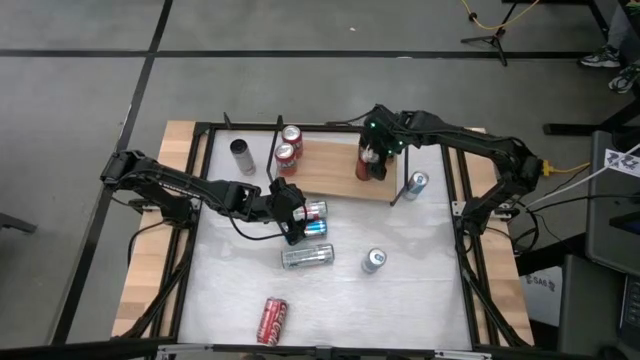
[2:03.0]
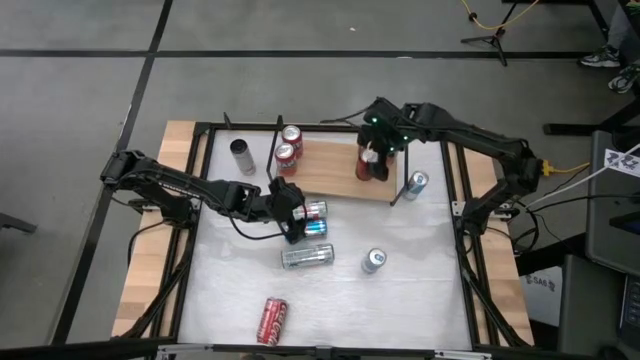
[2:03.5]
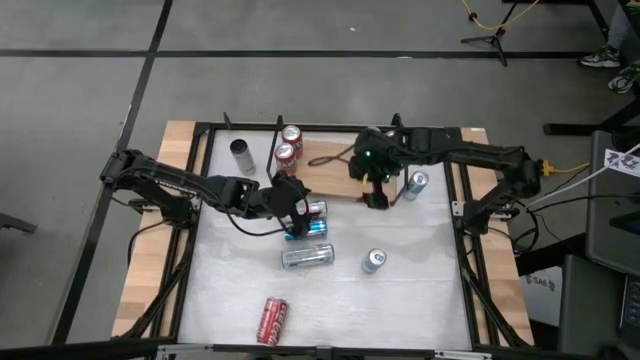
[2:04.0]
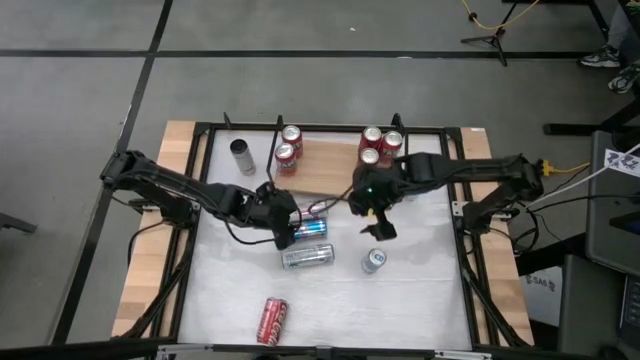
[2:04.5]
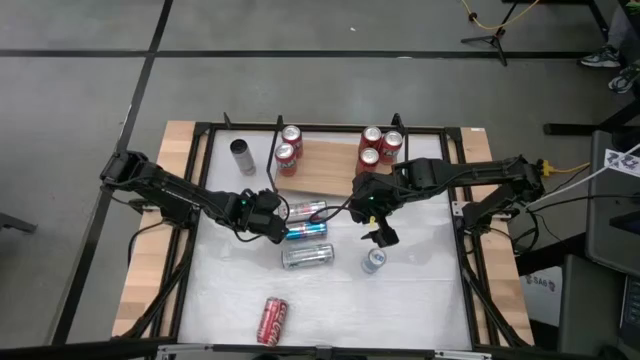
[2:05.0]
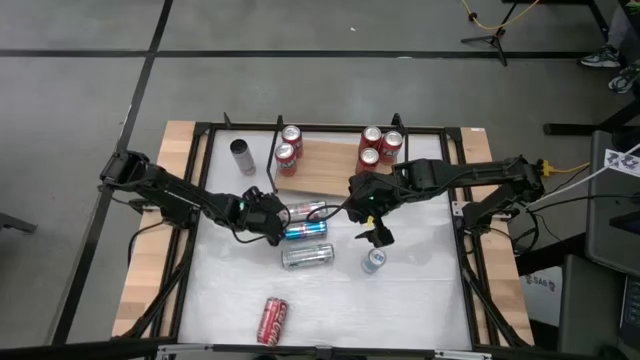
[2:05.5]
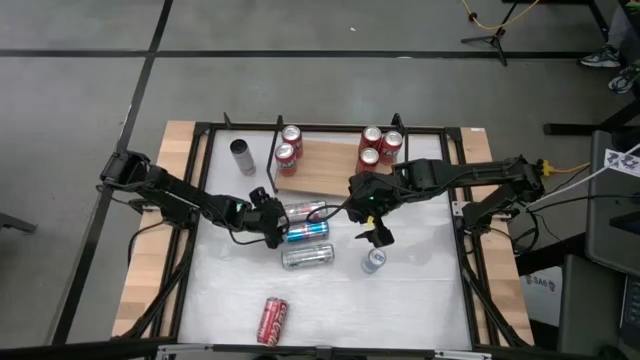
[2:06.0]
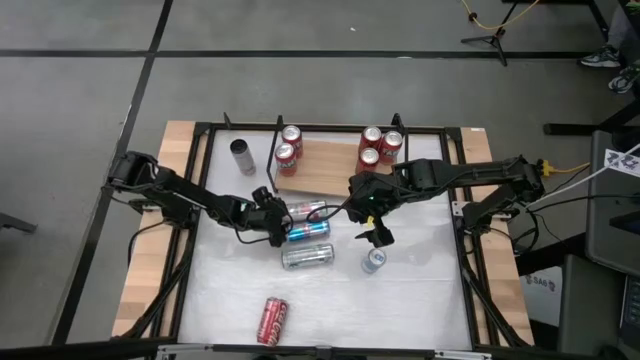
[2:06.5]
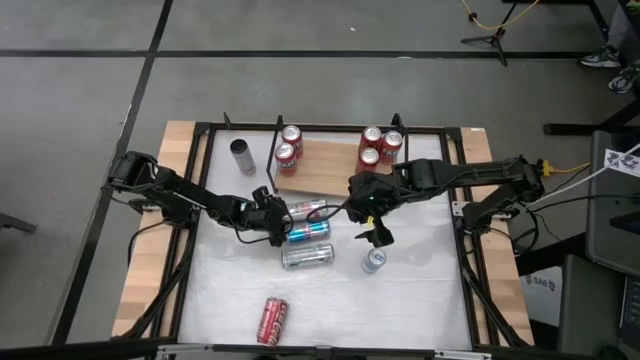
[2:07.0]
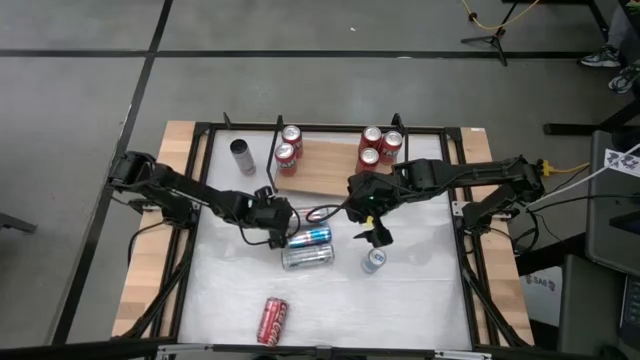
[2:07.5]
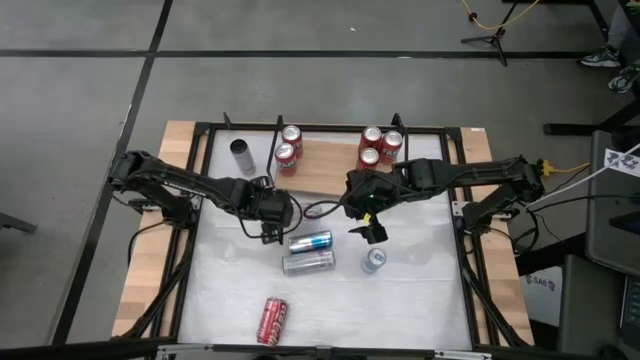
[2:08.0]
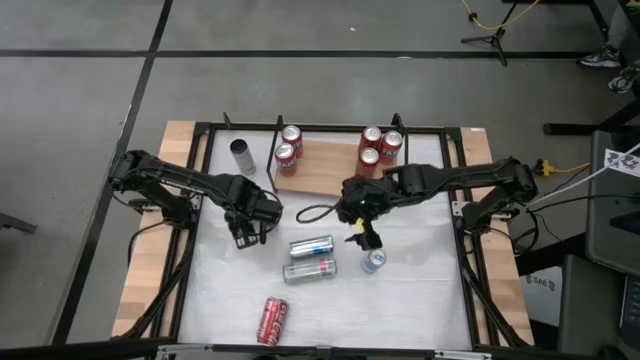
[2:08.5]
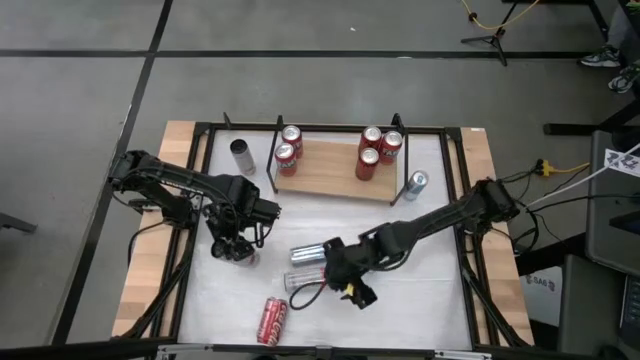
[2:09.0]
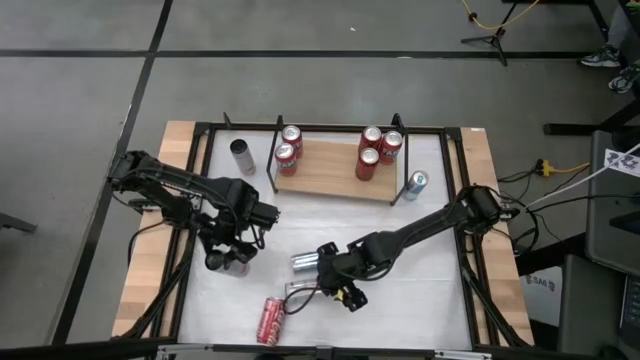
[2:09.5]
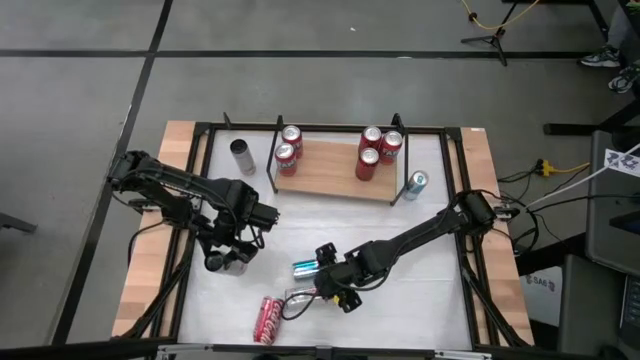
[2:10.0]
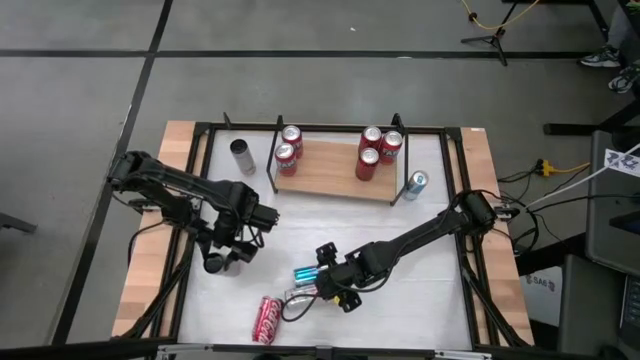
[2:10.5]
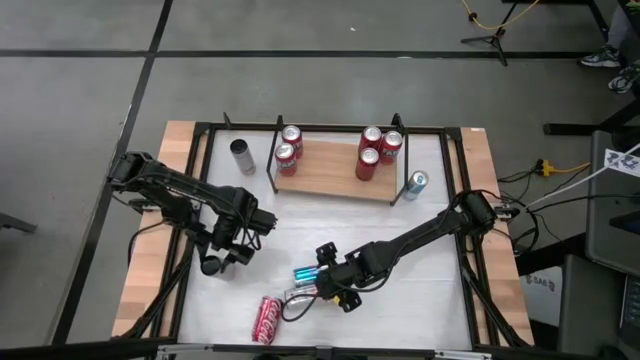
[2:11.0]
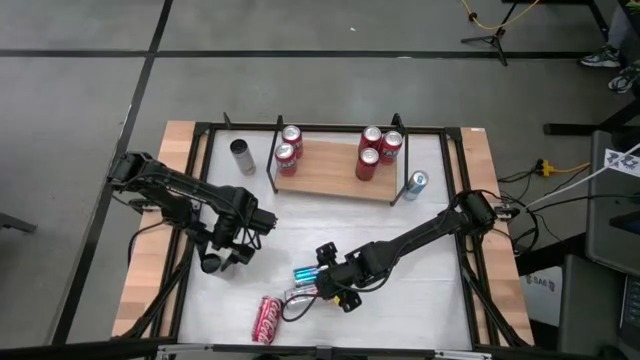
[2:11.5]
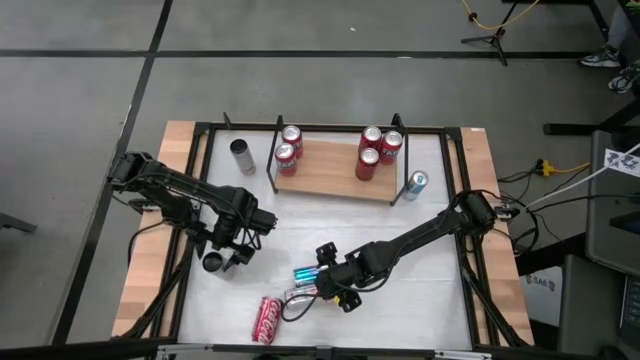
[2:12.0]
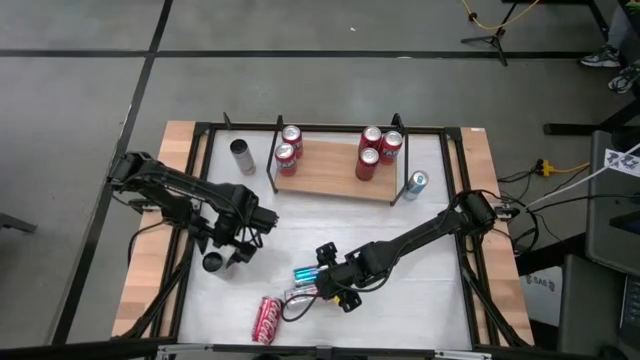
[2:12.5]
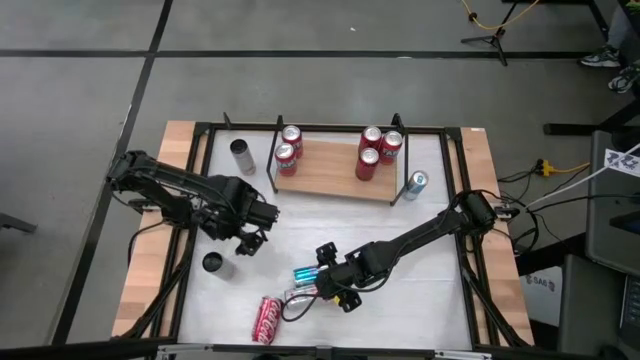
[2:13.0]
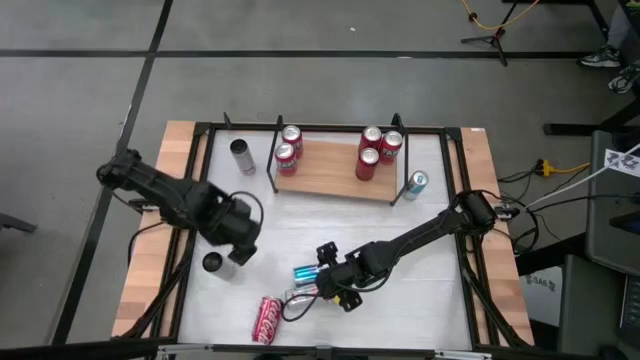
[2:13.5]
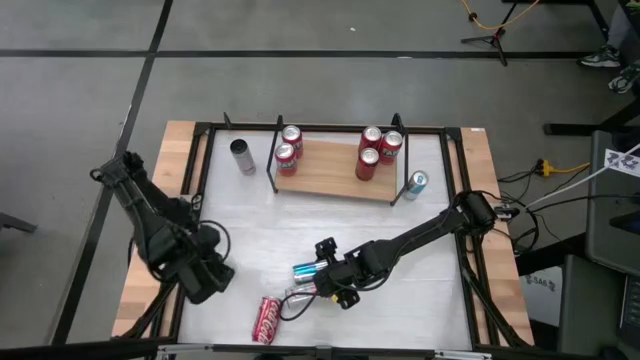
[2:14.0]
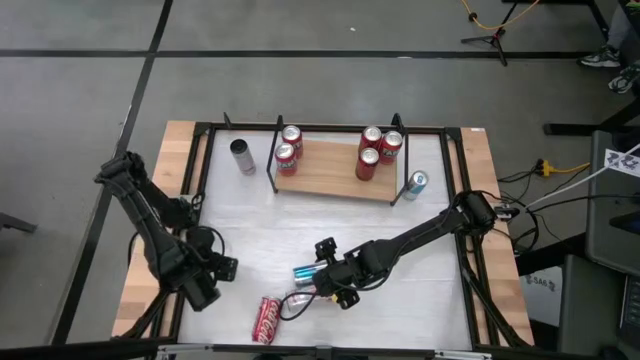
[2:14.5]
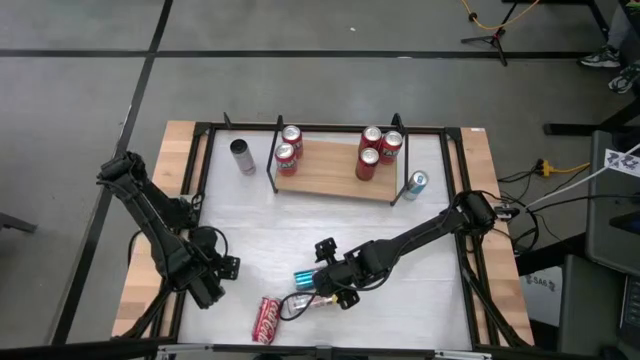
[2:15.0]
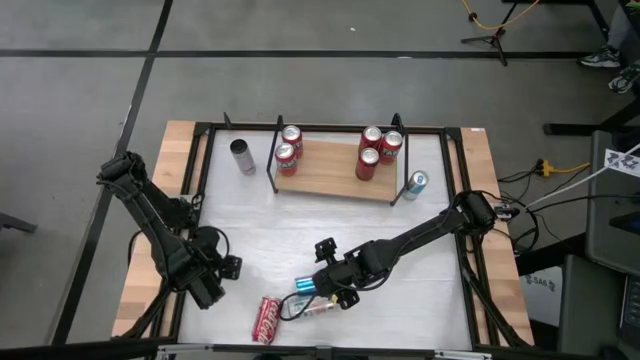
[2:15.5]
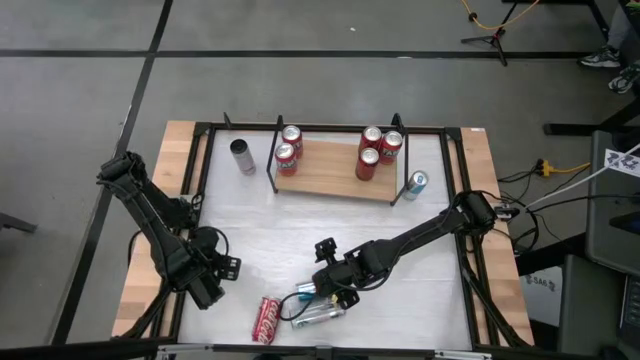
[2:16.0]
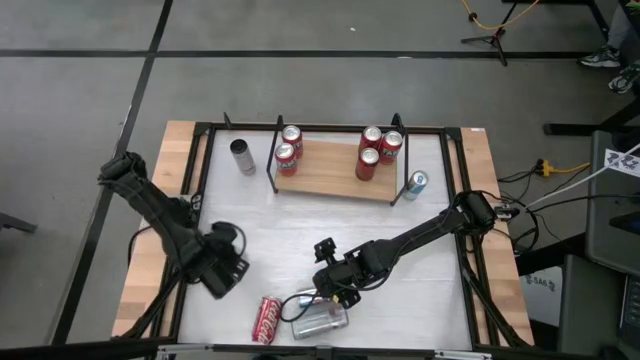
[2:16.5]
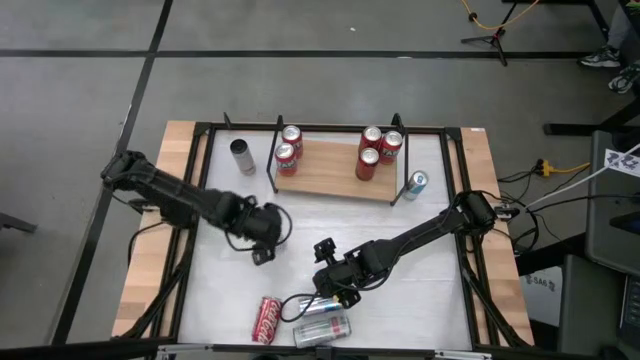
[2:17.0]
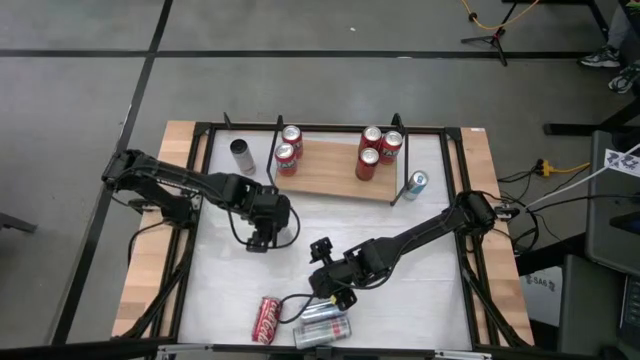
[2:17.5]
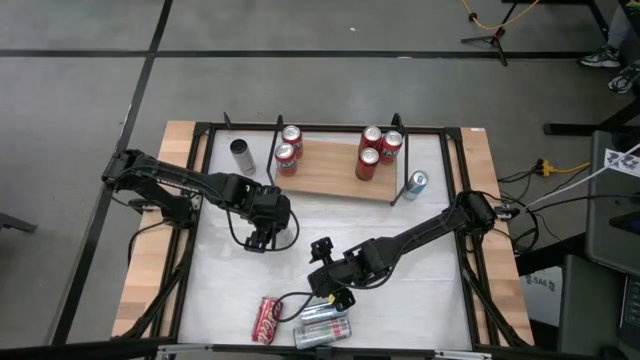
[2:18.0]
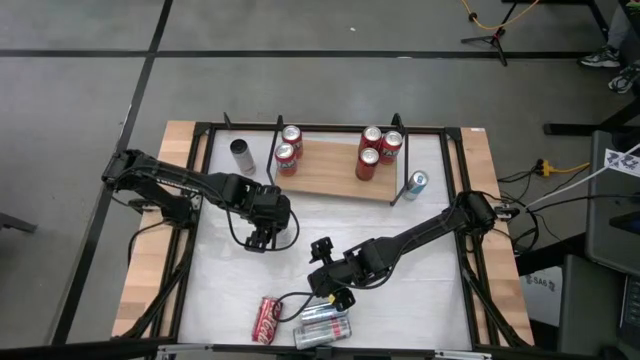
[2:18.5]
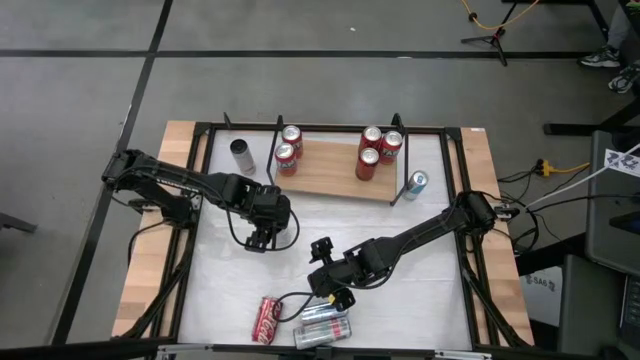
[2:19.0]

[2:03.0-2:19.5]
Task: Place canned beverage on shelf
Put the middle white-pink soda can on the shelf

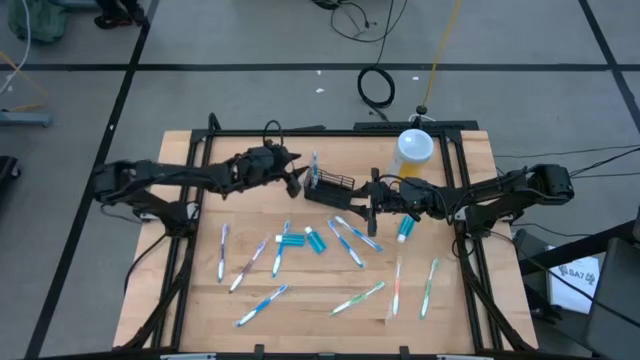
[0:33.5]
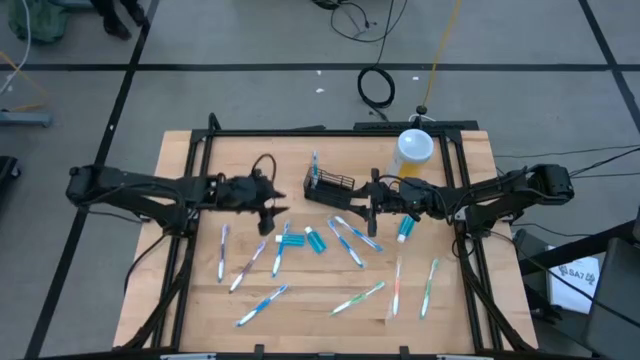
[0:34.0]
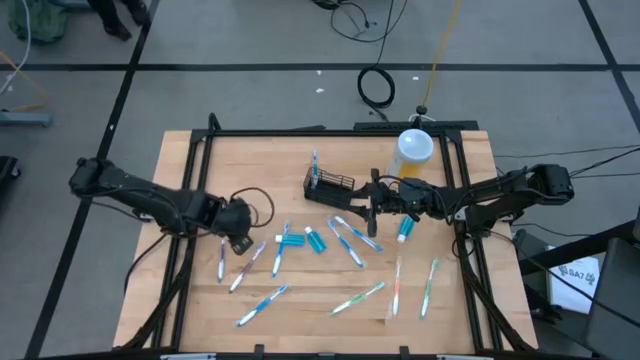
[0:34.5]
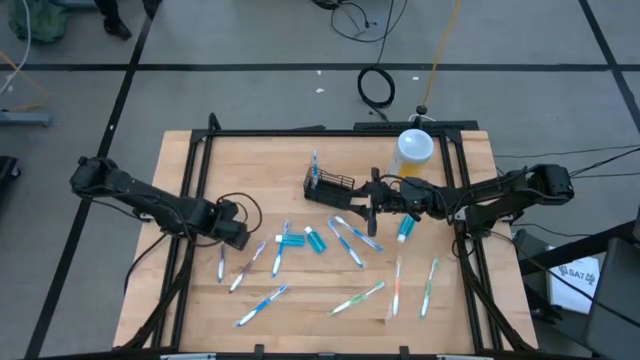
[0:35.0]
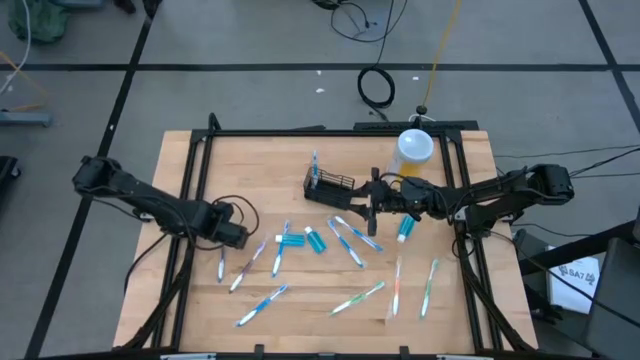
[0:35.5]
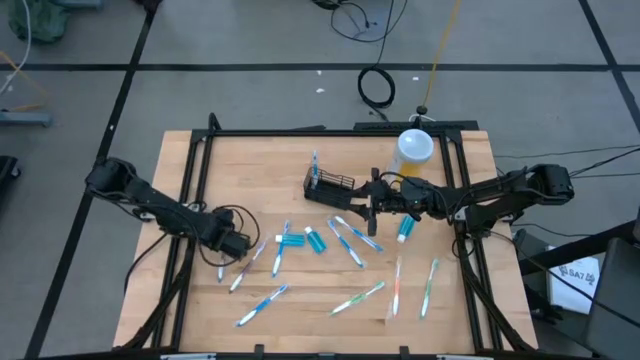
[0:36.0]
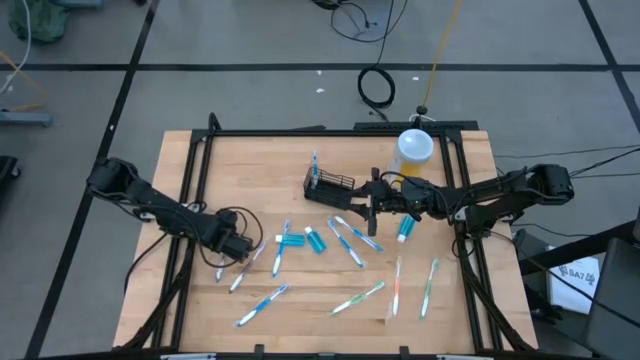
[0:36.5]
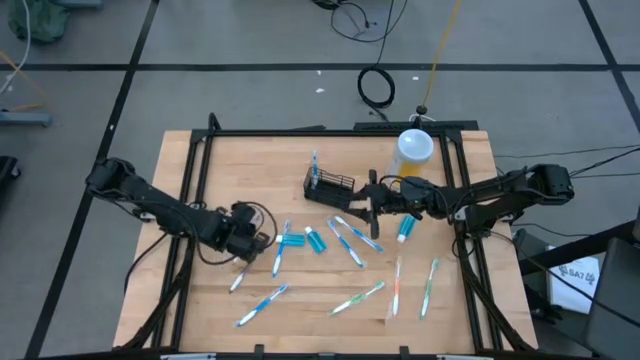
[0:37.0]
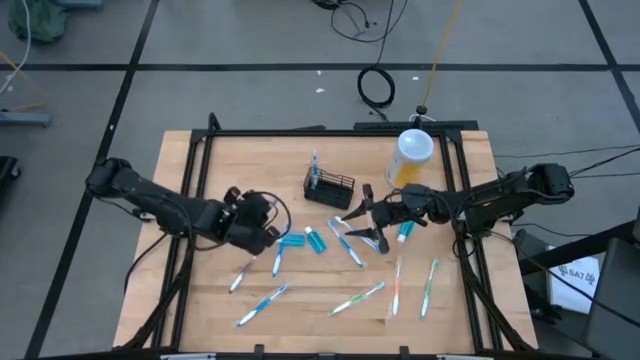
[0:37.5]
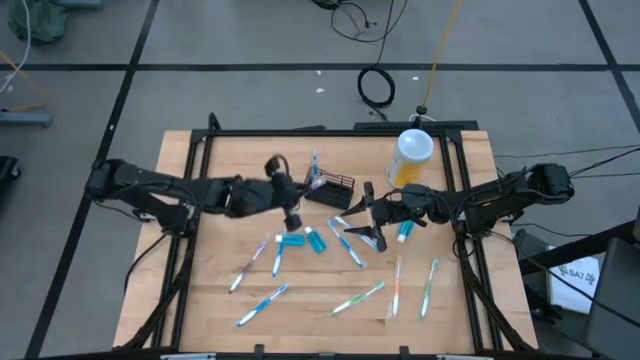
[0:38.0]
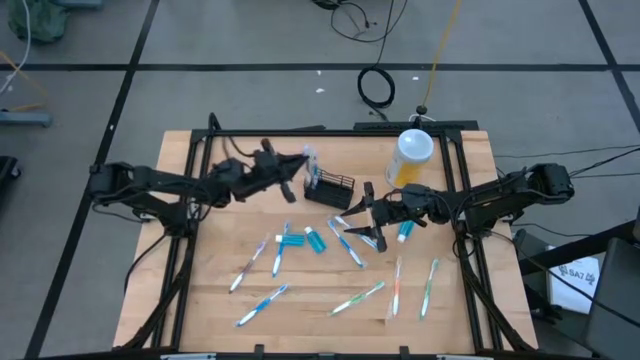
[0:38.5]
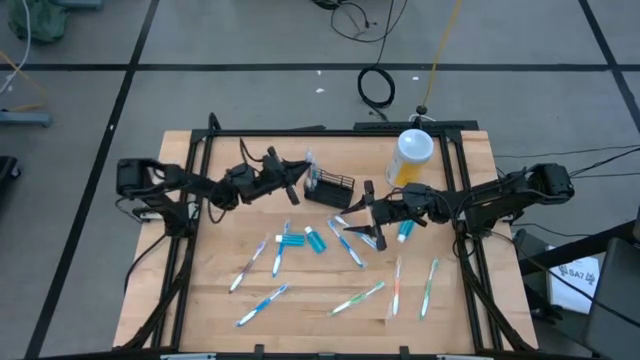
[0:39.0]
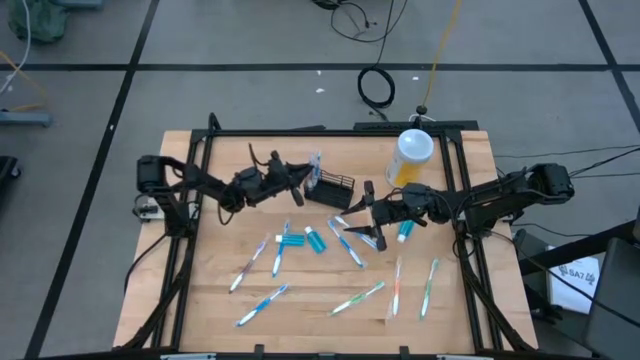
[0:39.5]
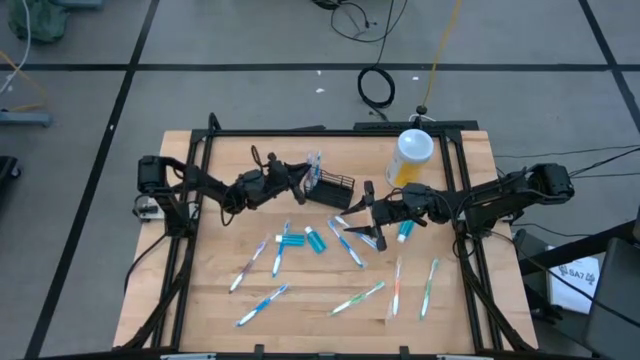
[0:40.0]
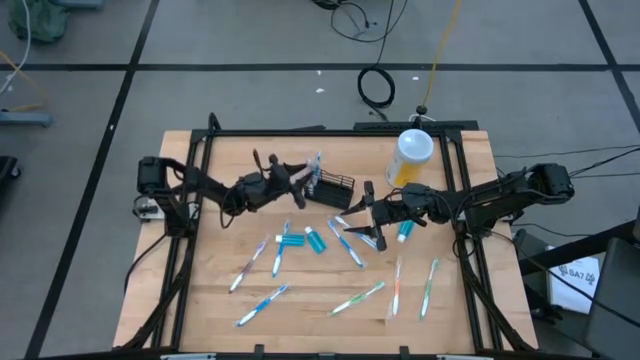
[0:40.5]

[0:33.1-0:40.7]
Task: Pick & Place toothbrushing station
Put the purple toothbrush into the black wire organizer
